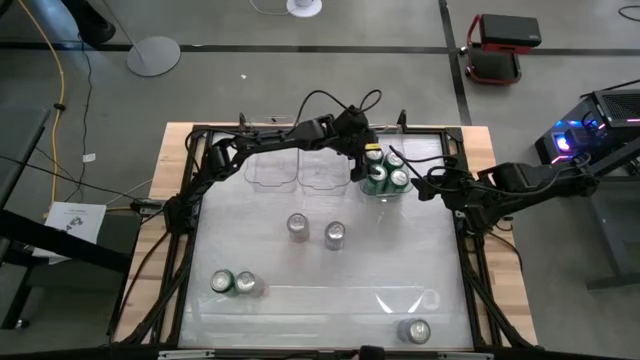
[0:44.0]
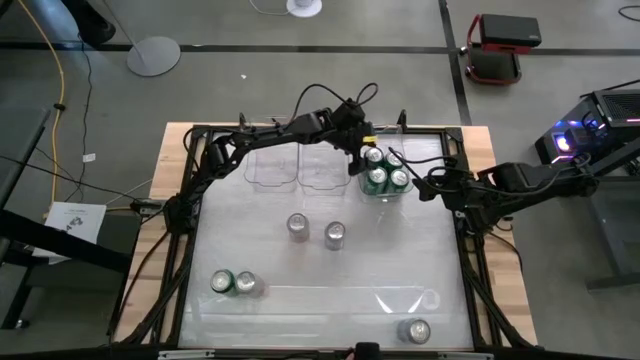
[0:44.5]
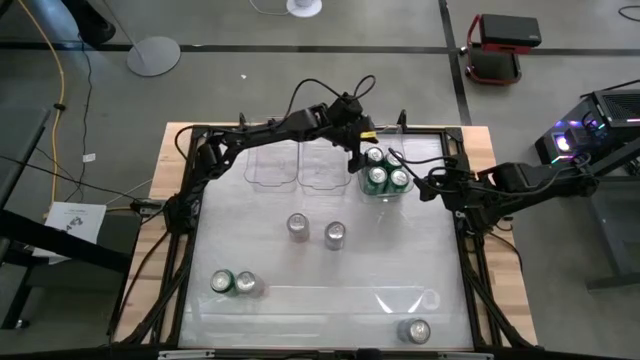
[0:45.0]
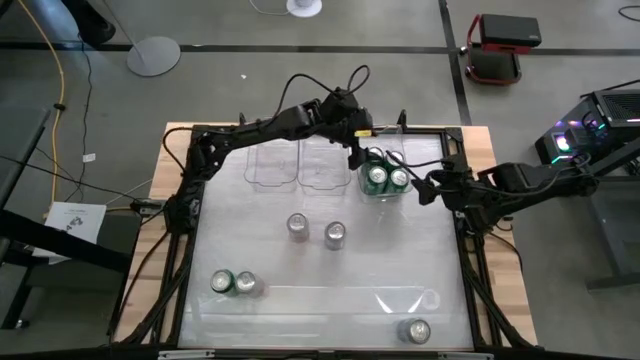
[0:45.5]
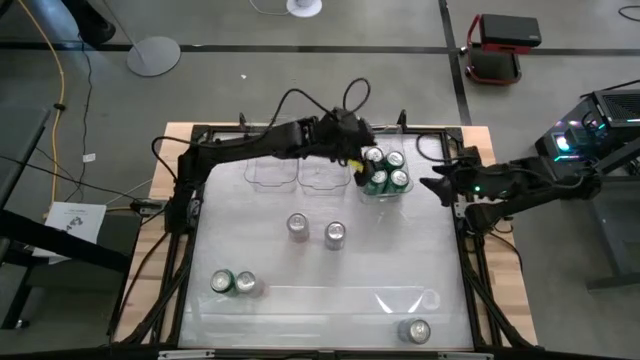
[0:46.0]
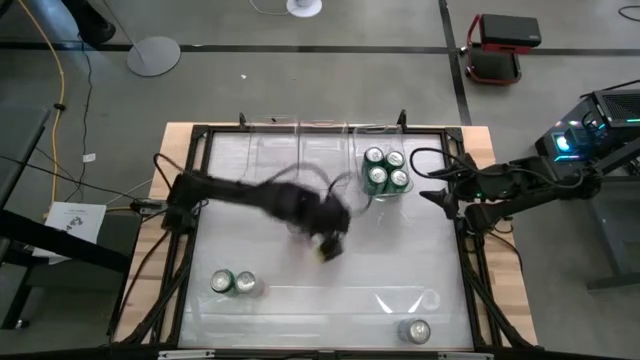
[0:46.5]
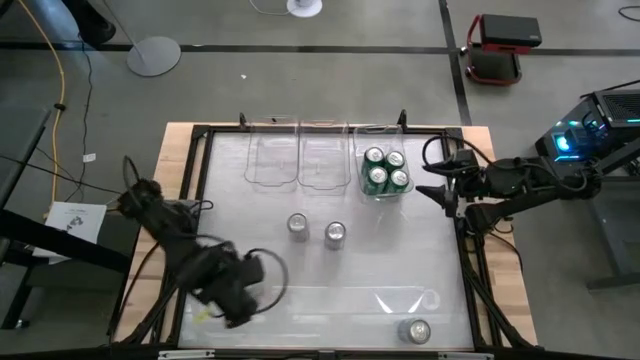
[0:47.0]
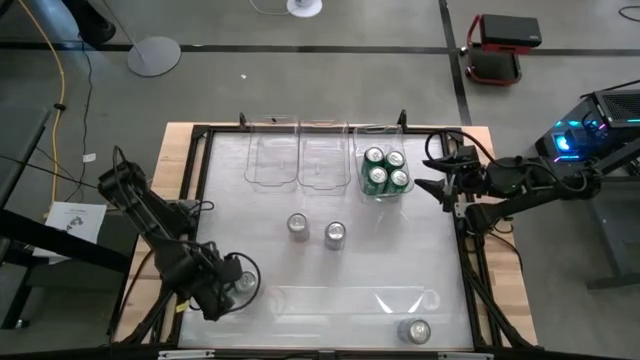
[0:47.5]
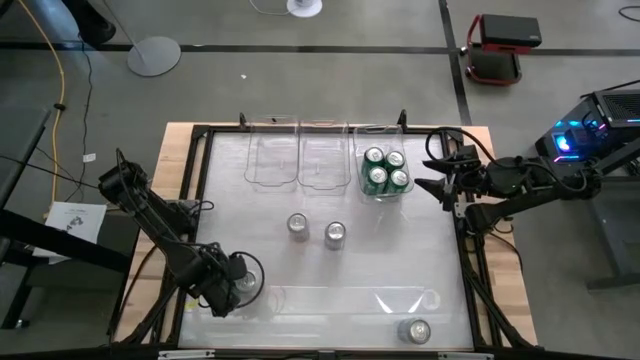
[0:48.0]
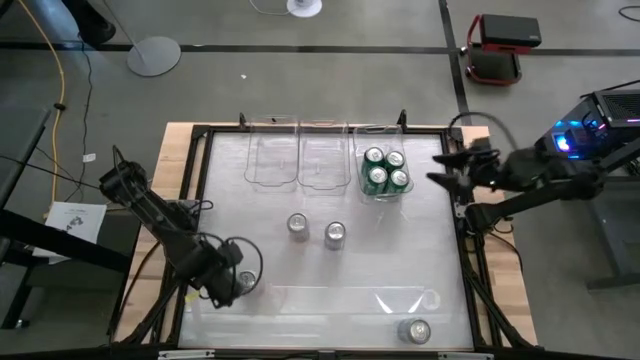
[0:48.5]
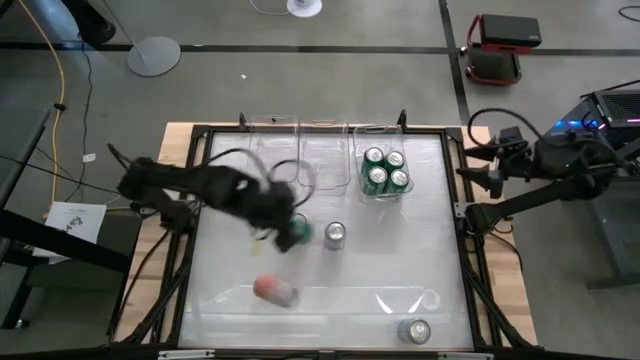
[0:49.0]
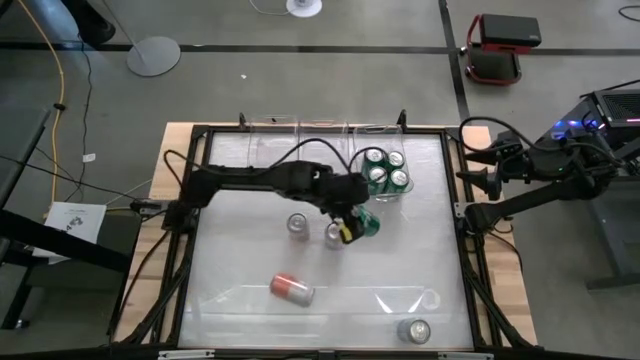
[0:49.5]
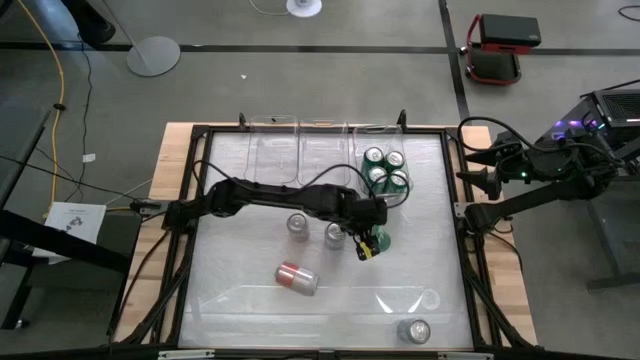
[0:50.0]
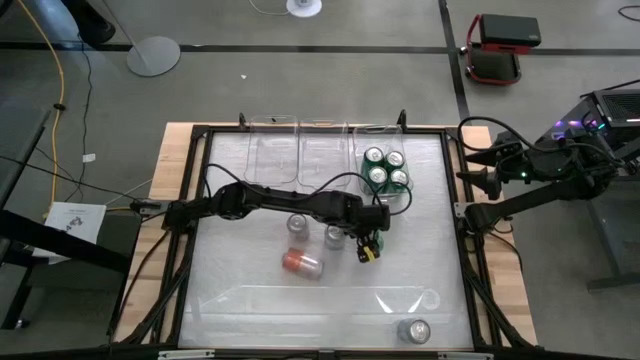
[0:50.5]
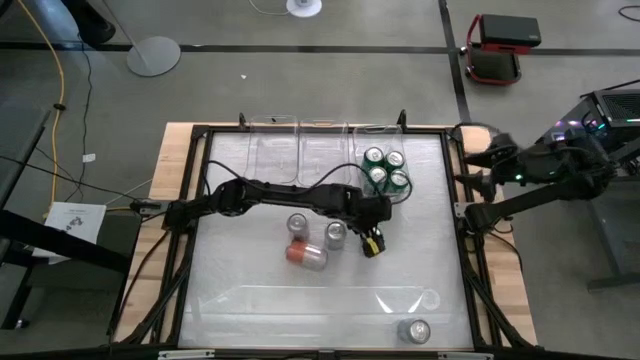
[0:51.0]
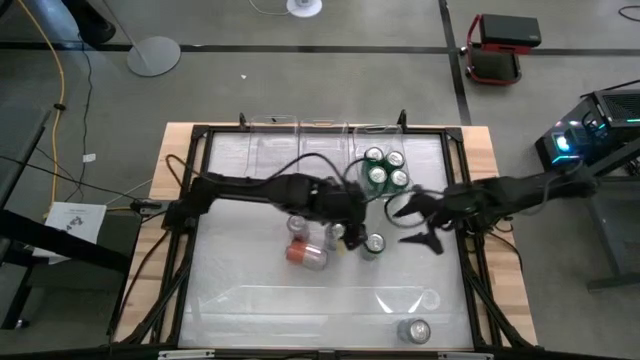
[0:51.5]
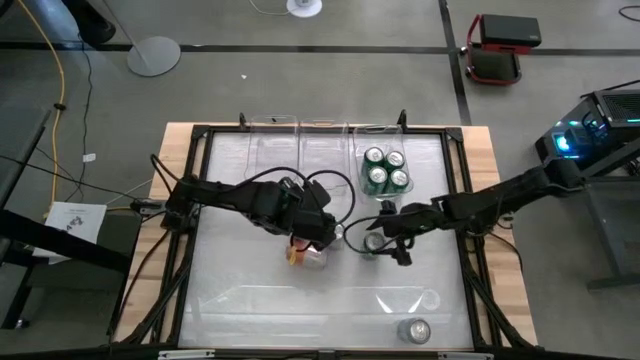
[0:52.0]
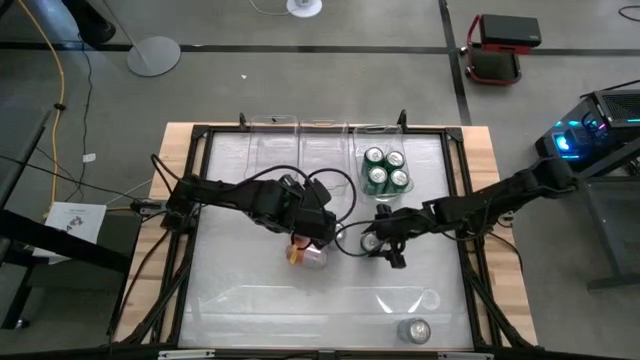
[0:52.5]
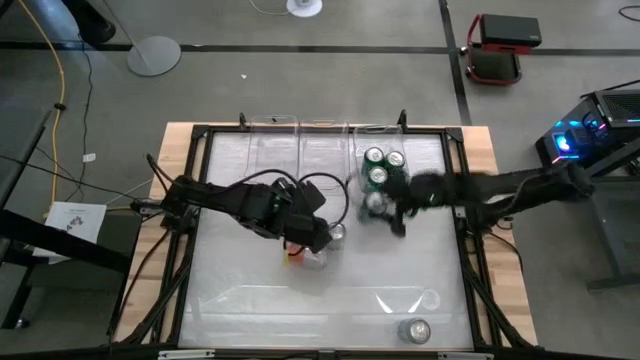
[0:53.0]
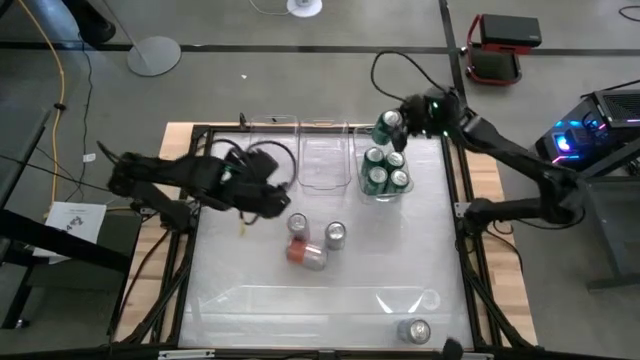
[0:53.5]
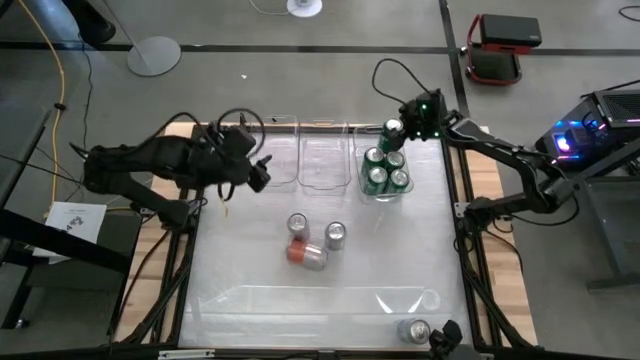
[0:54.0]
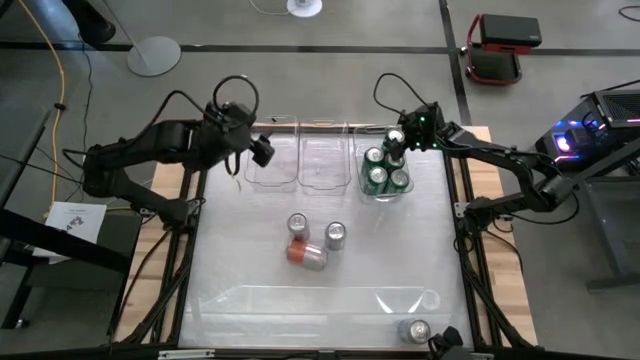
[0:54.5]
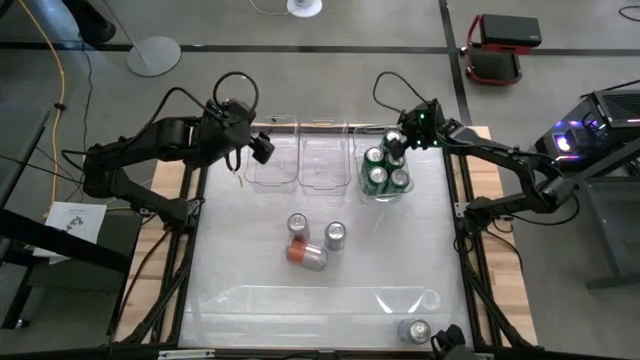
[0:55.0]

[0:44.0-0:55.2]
Task: Sort soda cans
Put green soda can into the right transparent bin

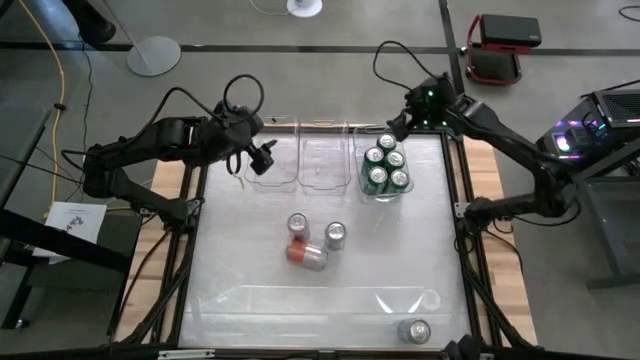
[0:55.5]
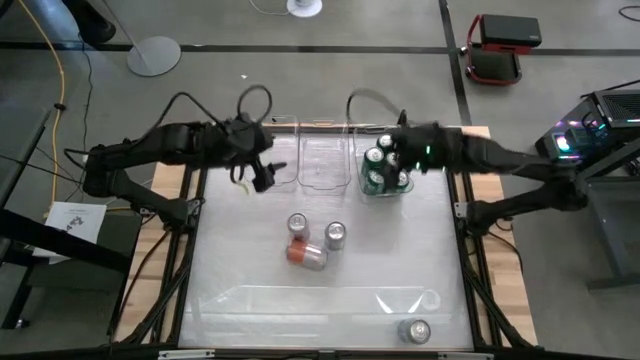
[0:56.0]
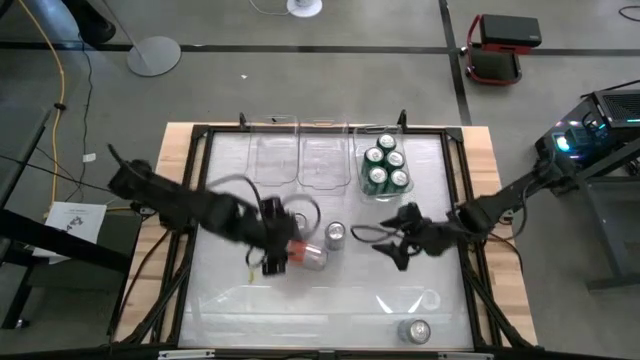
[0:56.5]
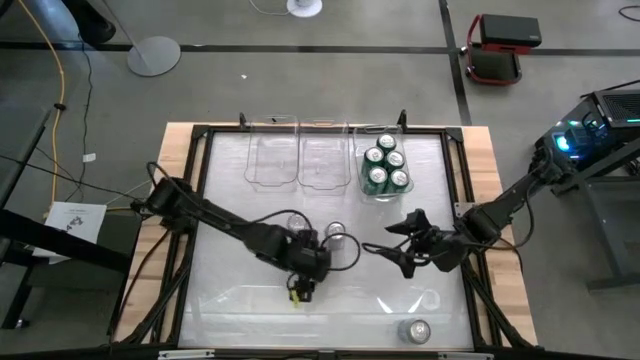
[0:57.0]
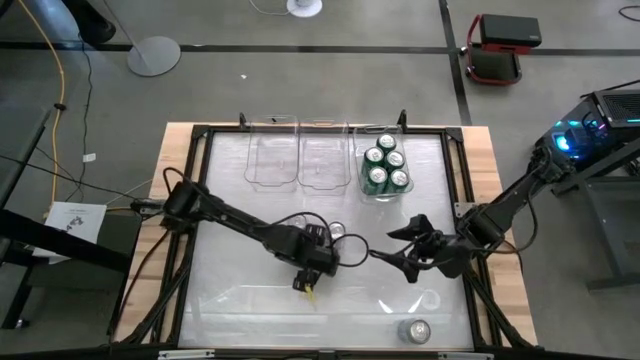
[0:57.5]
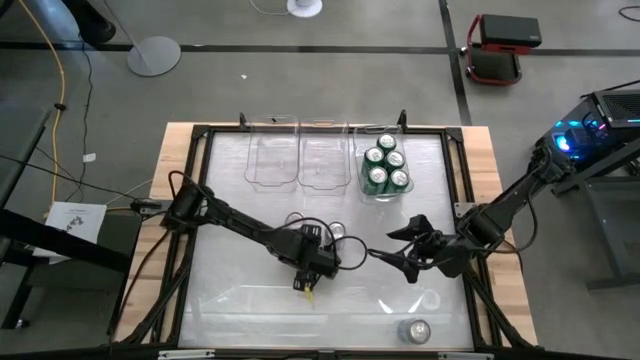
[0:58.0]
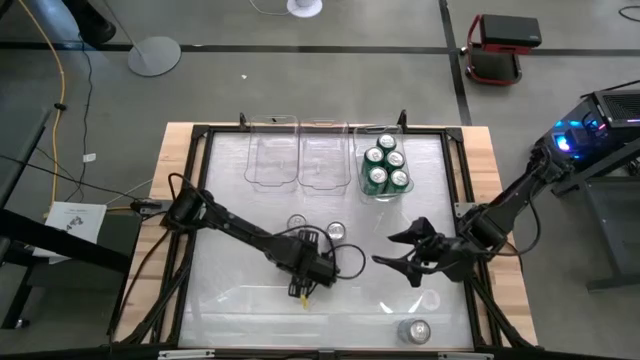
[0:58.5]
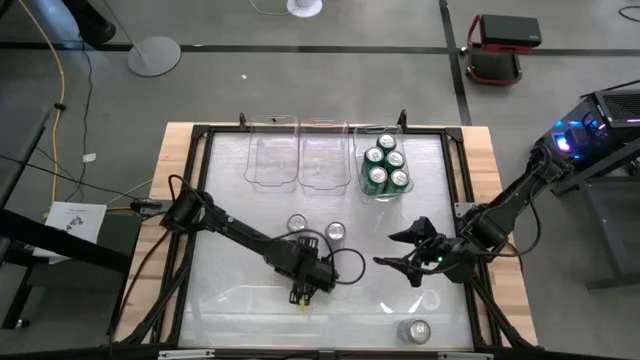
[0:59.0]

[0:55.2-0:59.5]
Put the orange-white soda can into the center transparent bin

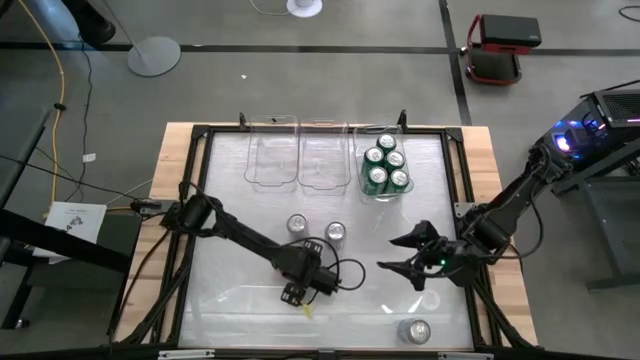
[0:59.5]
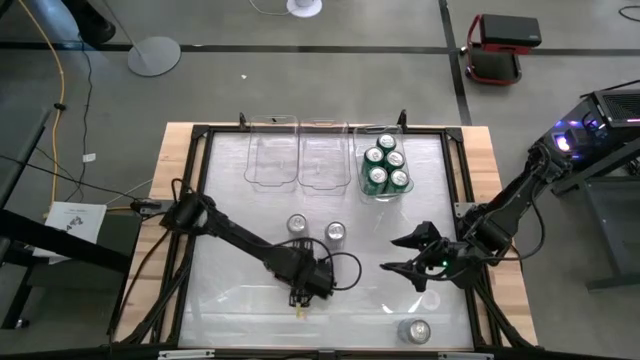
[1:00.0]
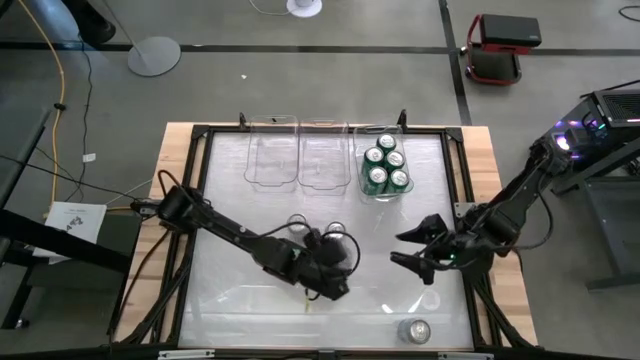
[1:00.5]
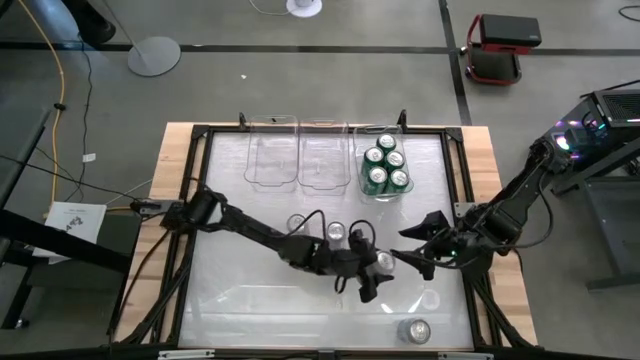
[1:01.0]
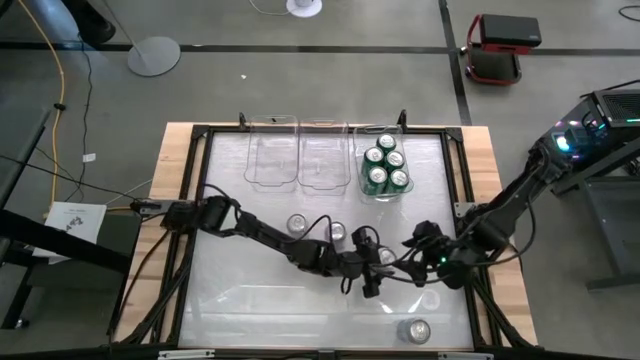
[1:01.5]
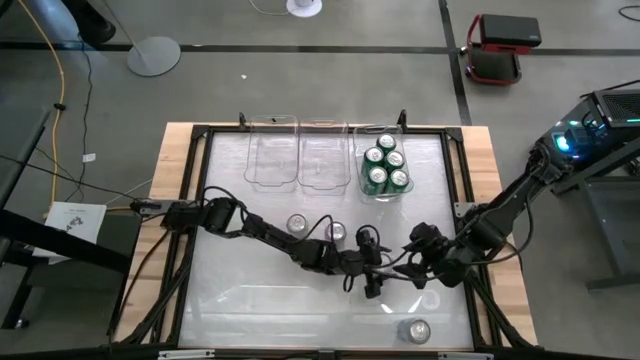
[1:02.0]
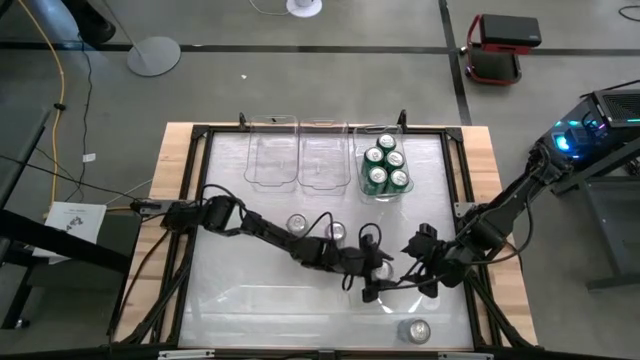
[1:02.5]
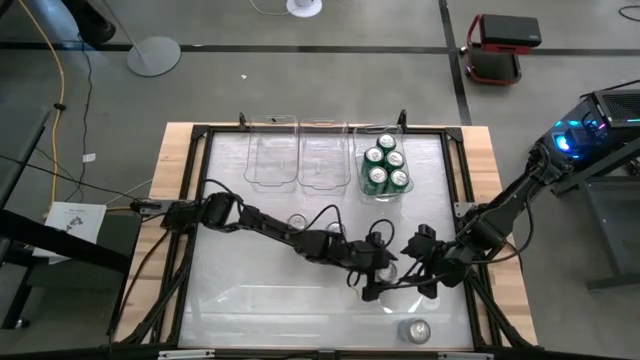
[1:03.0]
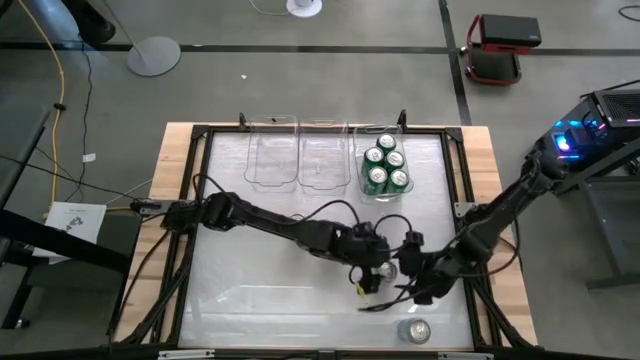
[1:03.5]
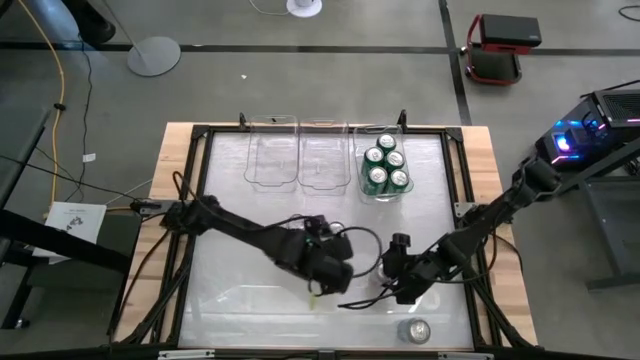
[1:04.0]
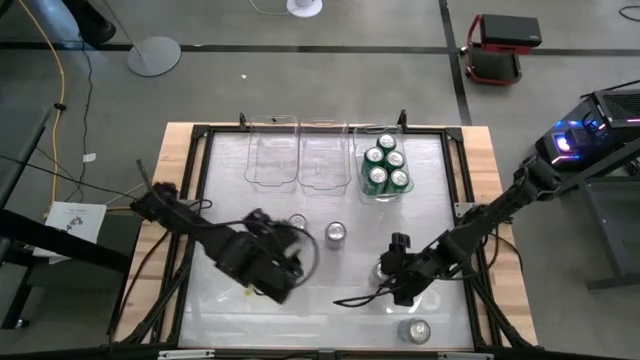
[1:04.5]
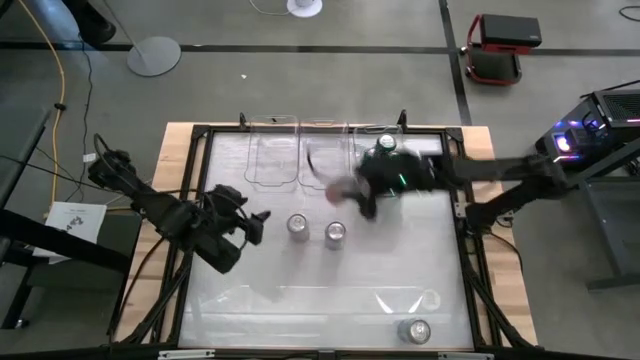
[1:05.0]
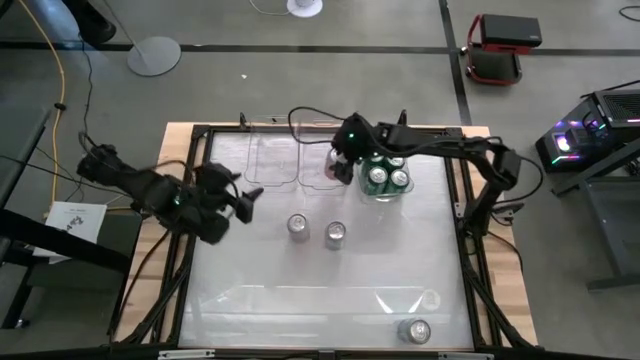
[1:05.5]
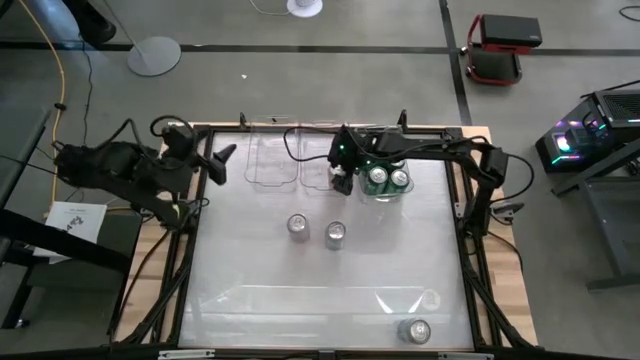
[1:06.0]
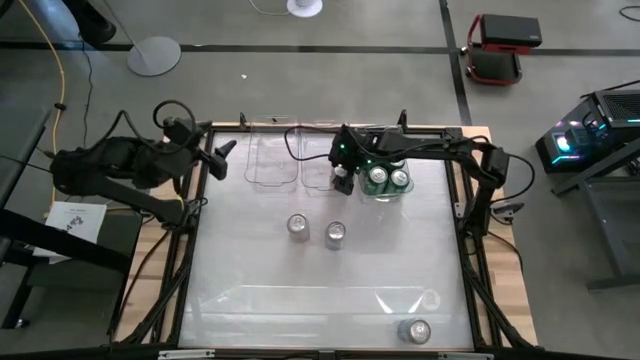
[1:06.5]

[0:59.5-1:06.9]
Put the orange-white soda can into the center transparent bin
